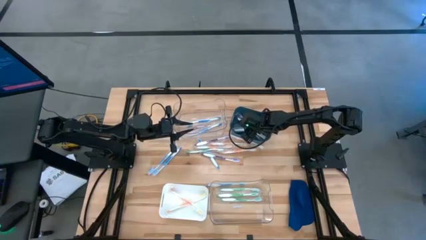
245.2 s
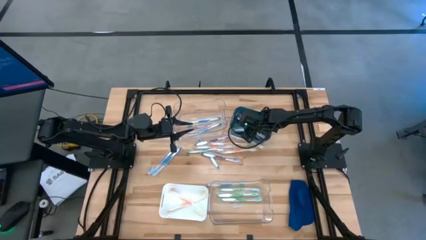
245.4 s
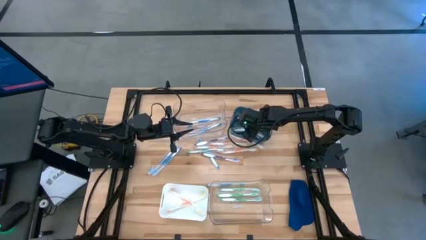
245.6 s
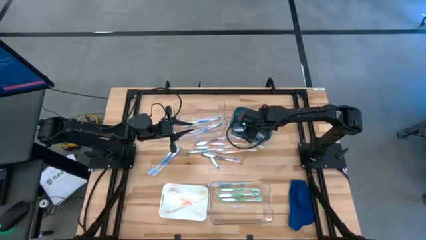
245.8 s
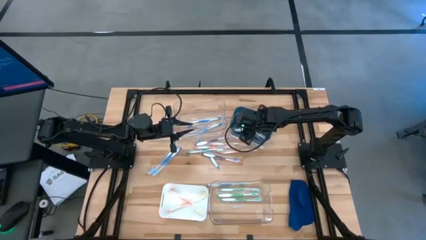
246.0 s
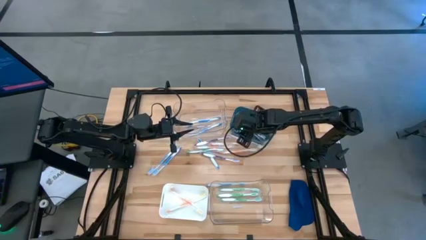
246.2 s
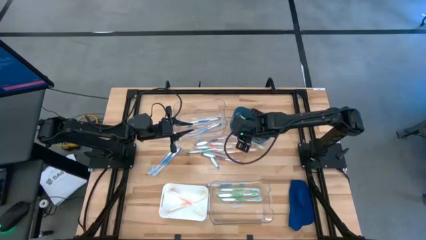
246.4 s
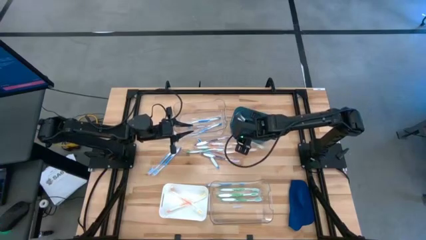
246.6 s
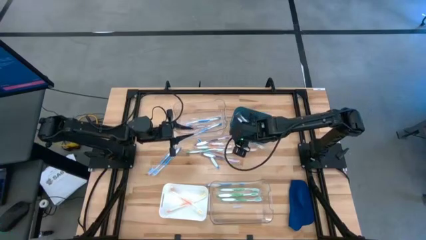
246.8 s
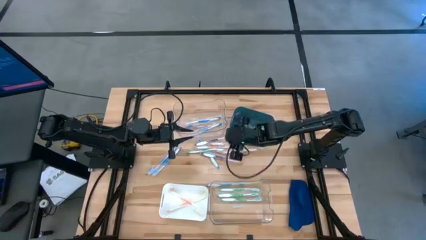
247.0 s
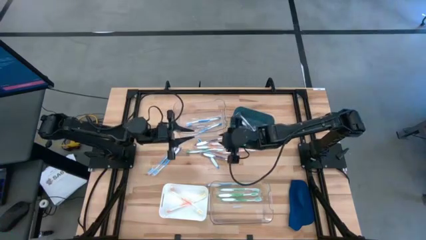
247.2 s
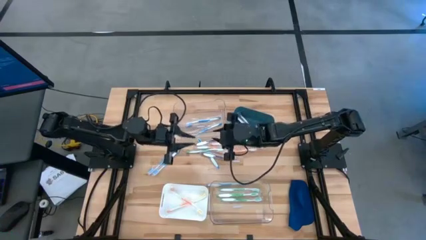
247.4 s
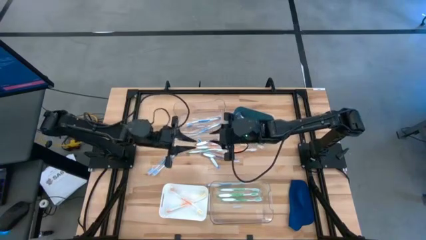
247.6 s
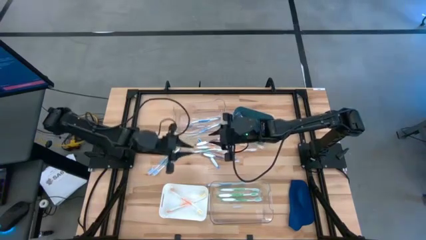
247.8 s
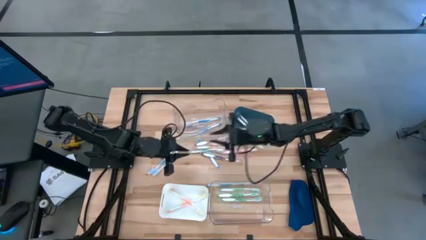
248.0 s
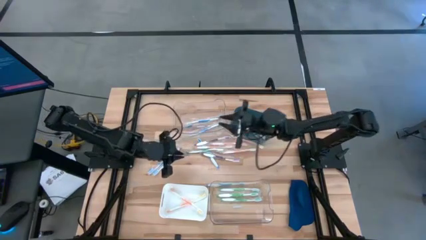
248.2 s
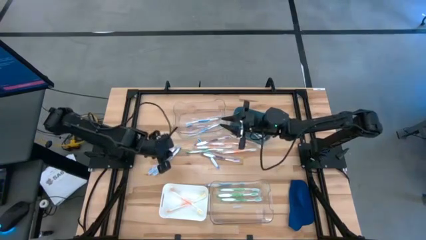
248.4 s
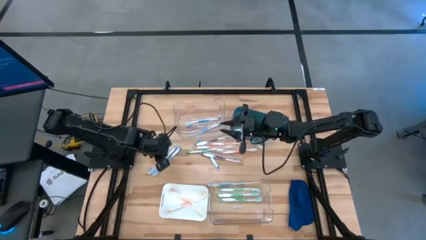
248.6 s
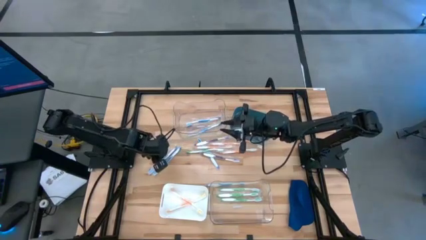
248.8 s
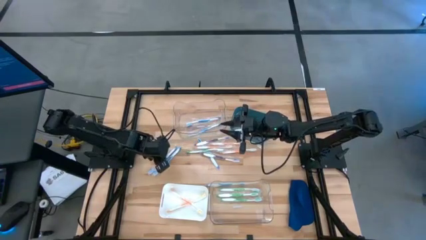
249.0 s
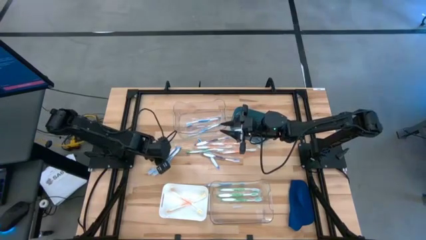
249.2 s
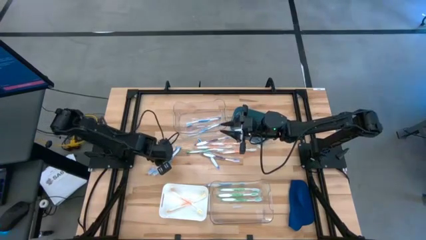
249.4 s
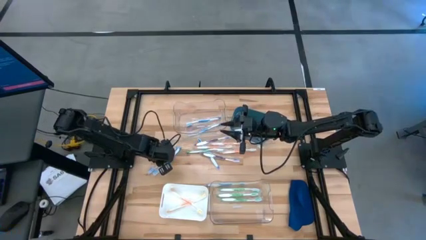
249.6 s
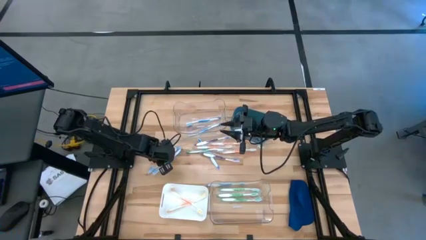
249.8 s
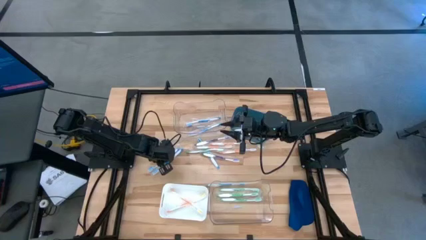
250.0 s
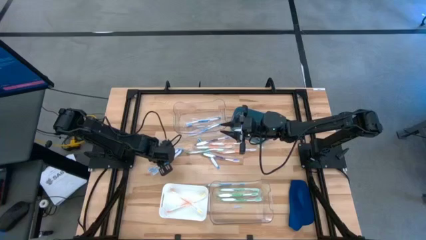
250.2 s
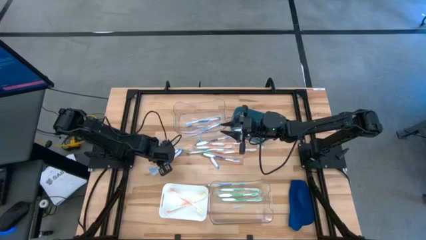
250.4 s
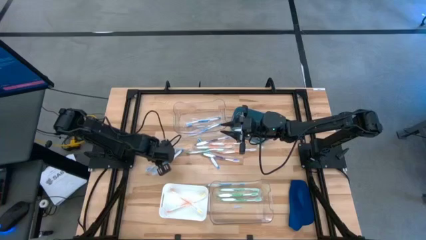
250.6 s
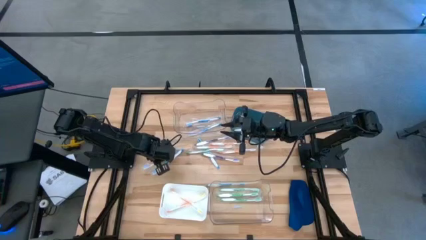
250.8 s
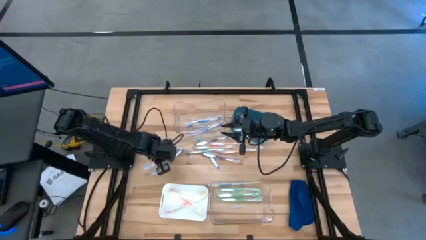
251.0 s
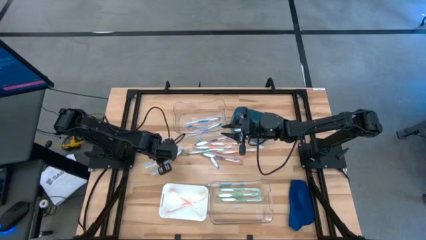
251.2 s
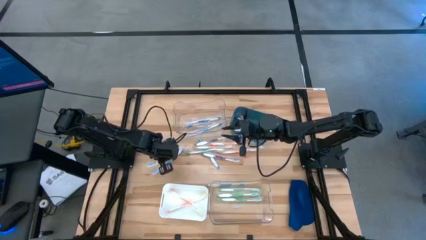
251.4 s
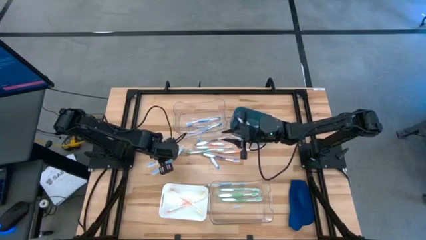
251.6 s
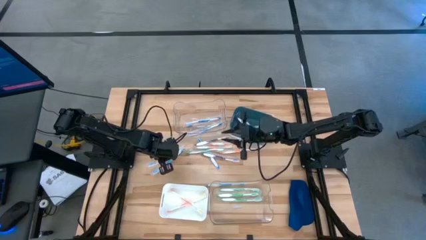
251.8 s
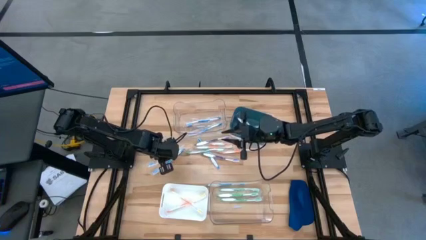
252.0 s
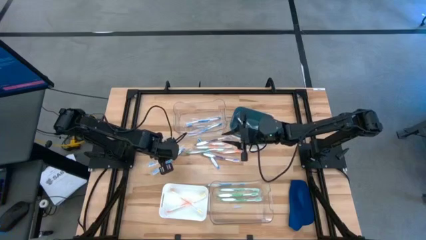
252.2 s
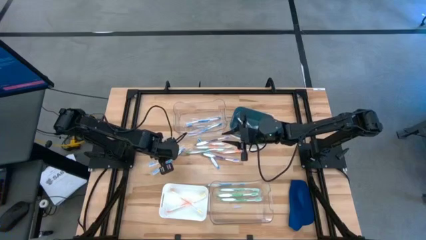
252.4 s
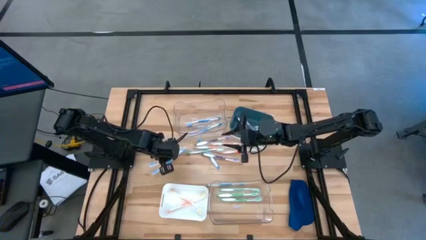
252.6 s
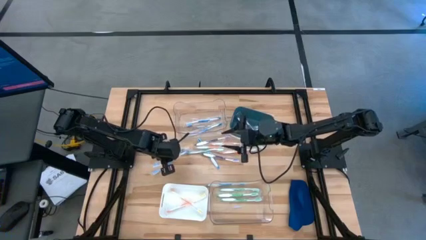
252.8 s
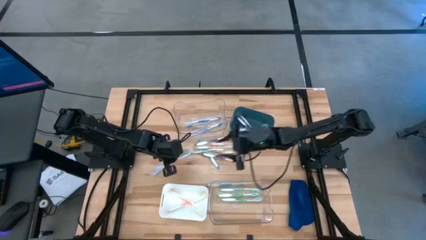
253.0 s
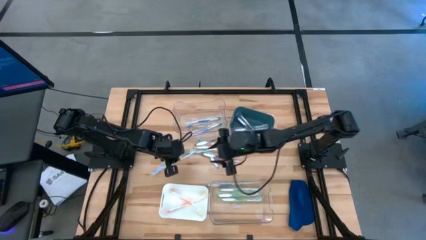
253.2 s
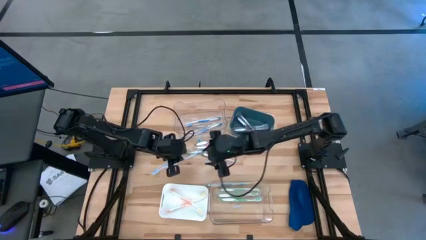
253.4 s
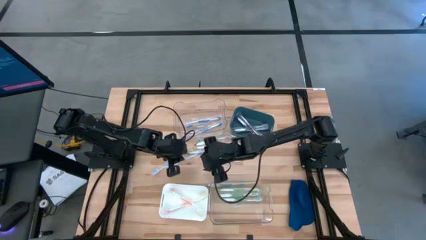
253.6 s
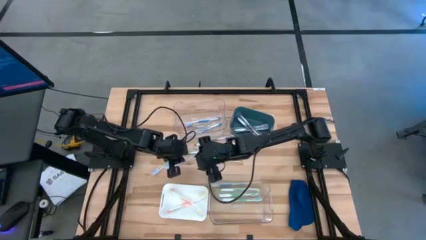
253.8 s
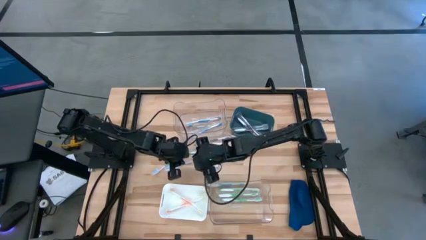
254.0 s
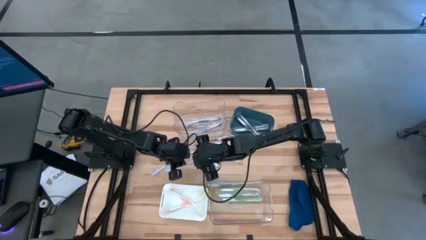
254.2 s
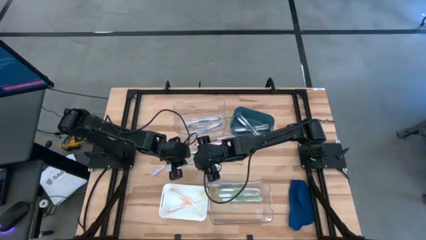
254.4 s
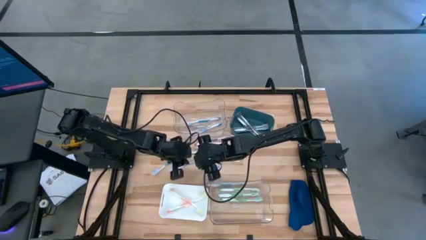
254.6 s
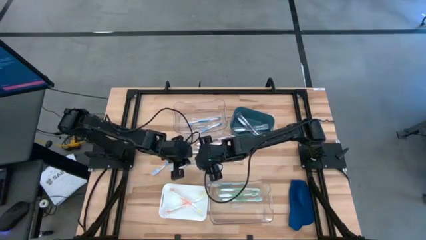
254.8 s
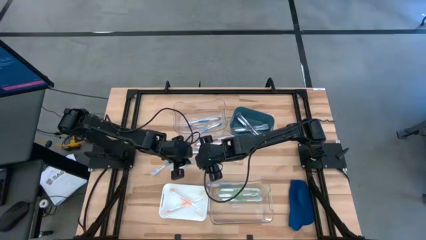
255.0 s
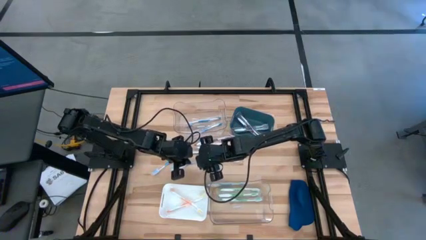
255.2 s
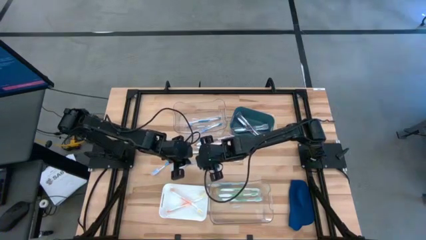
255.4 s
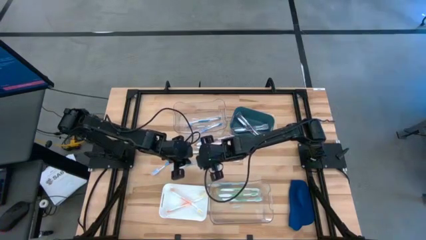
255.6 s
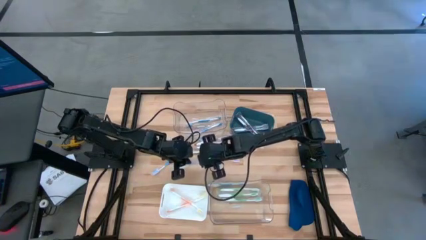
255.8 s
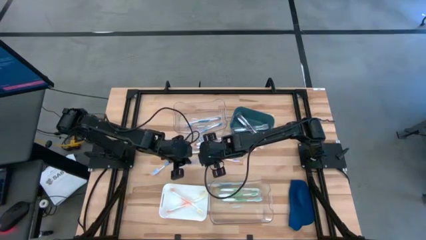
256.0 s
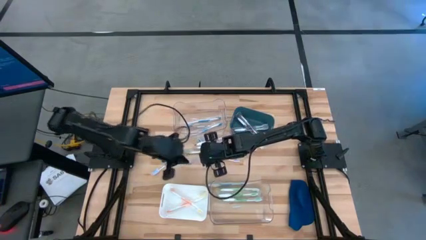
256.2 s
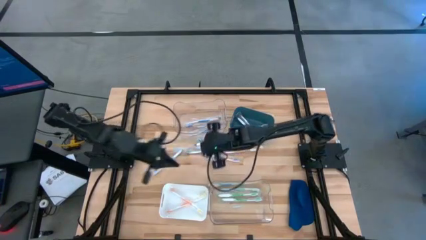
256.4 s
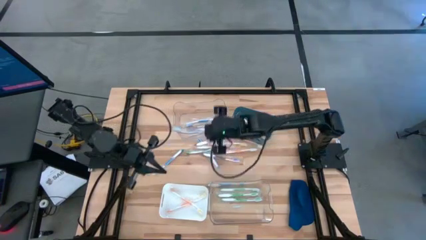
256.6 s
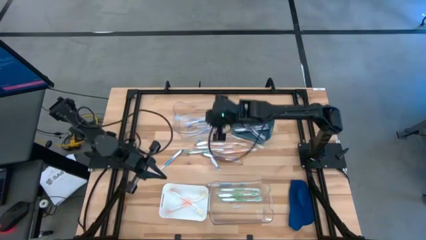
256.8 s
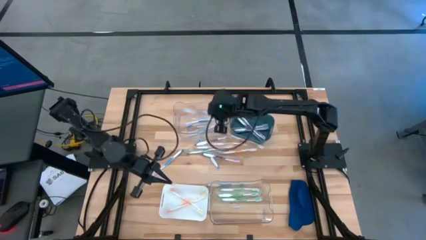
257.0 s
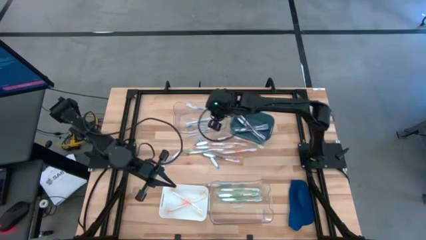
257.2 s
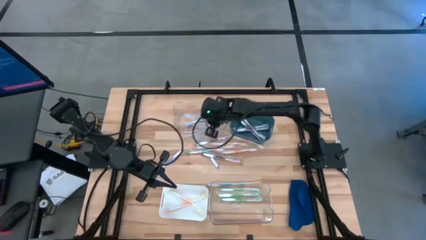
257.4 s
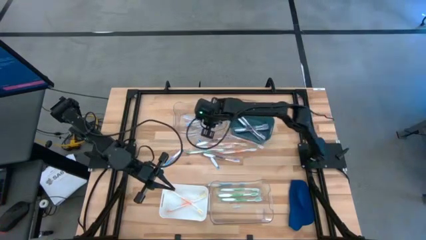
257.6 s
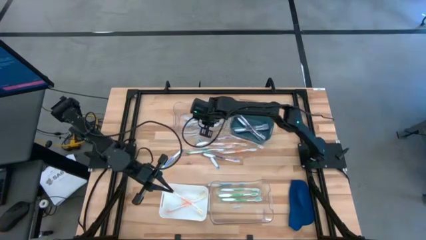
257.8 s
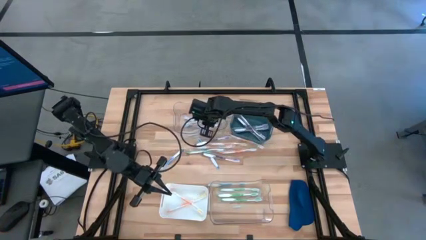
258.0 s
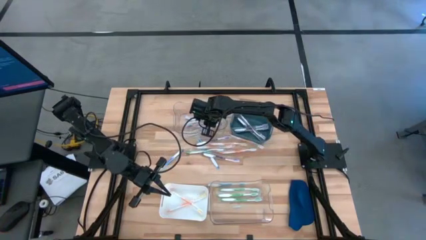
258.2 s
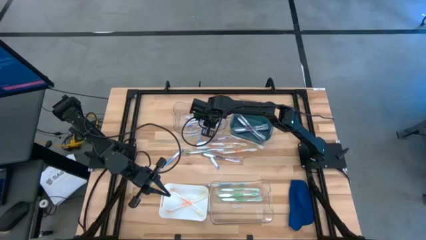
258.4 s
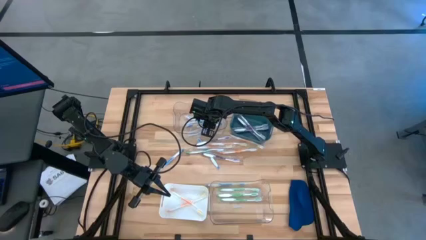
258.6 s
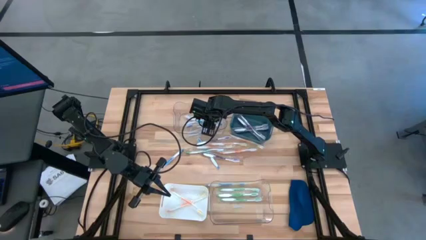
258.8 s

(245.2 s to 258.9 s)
Task: Pick & Place Toothbrushes
Put the blue toothbrush into the top transparent bin
